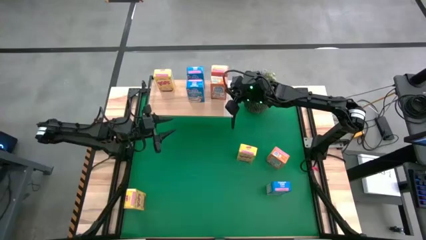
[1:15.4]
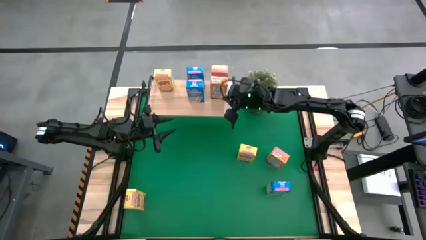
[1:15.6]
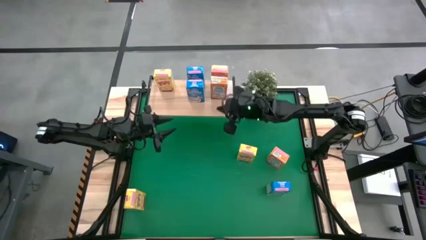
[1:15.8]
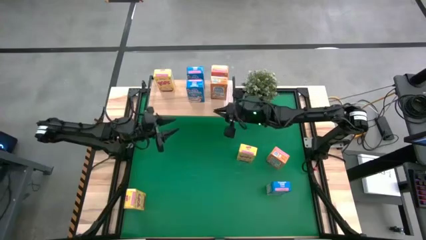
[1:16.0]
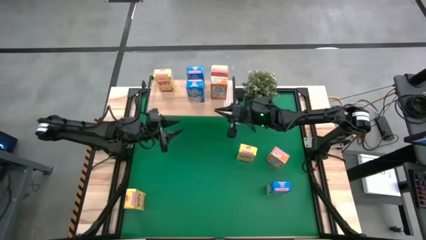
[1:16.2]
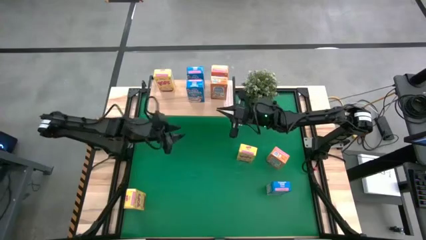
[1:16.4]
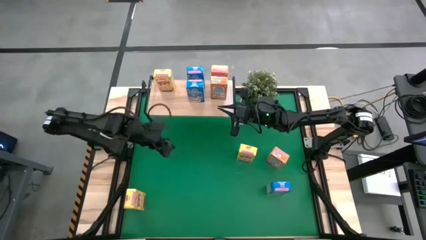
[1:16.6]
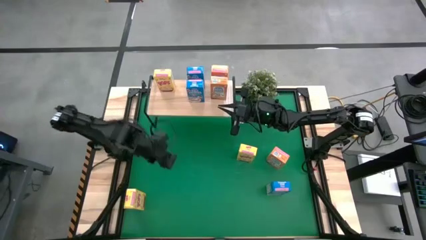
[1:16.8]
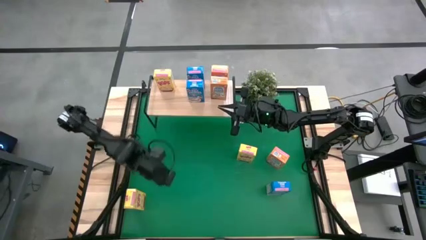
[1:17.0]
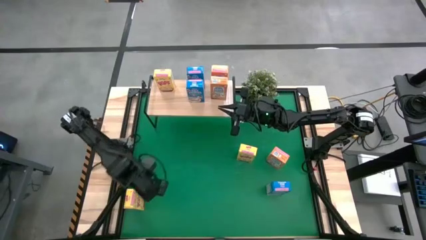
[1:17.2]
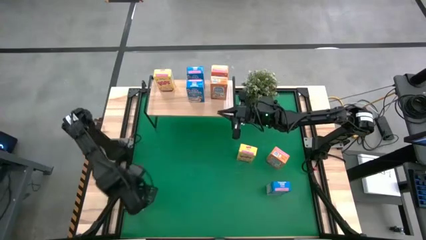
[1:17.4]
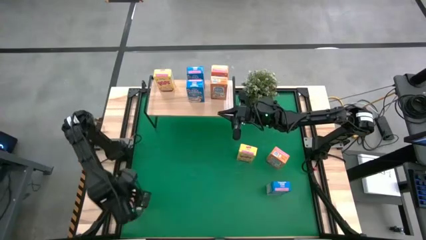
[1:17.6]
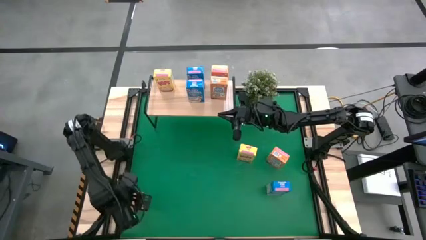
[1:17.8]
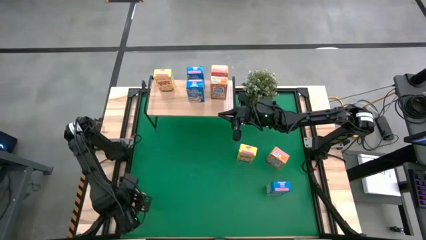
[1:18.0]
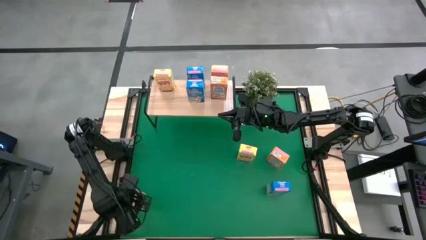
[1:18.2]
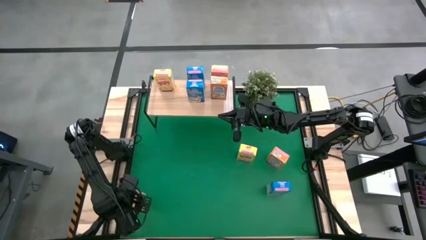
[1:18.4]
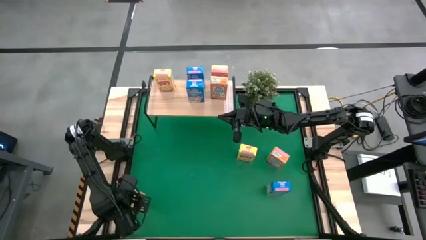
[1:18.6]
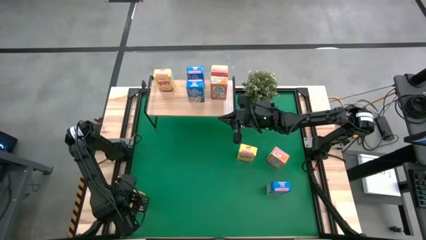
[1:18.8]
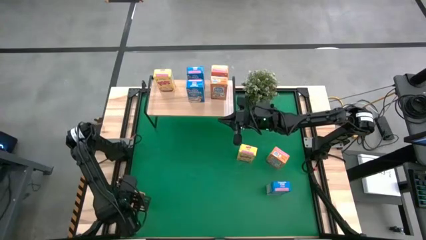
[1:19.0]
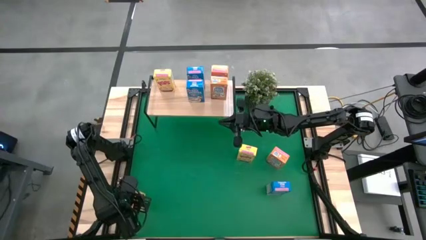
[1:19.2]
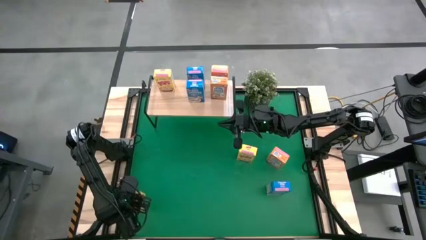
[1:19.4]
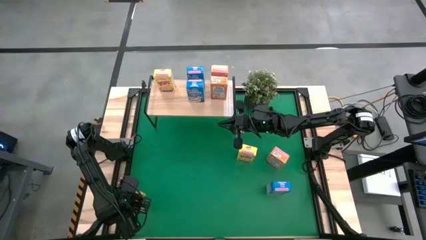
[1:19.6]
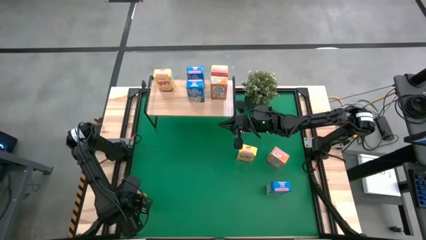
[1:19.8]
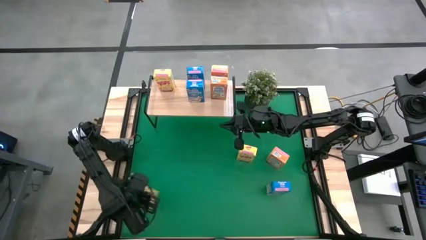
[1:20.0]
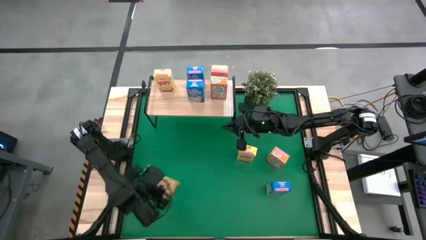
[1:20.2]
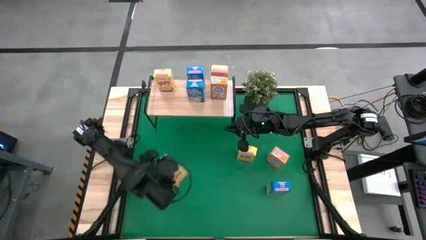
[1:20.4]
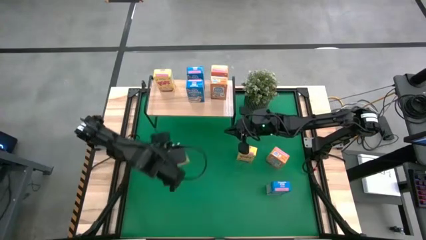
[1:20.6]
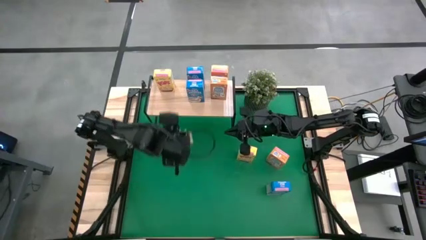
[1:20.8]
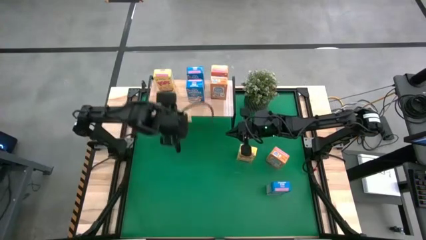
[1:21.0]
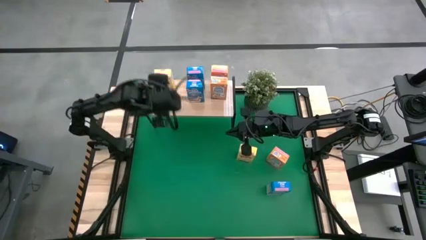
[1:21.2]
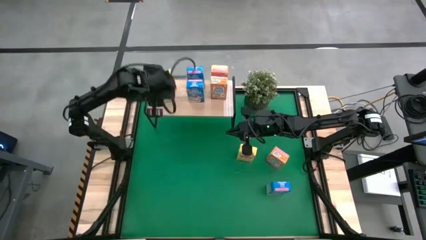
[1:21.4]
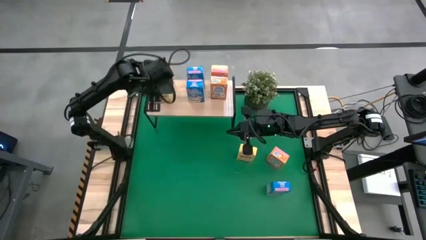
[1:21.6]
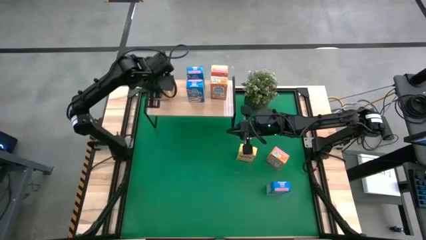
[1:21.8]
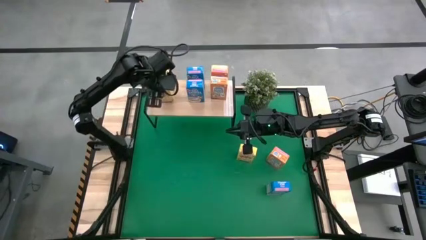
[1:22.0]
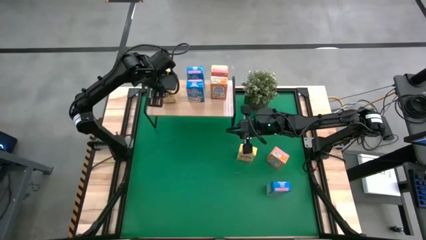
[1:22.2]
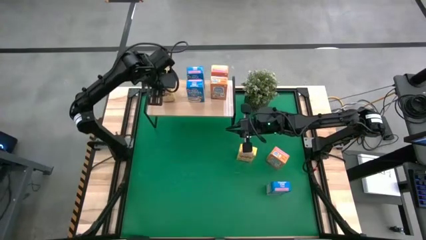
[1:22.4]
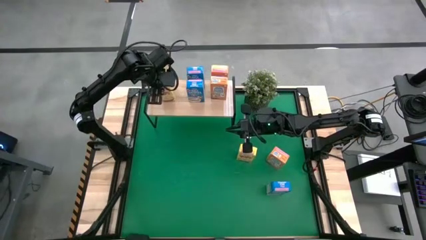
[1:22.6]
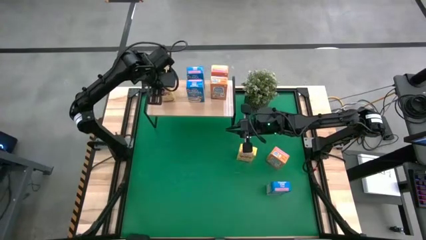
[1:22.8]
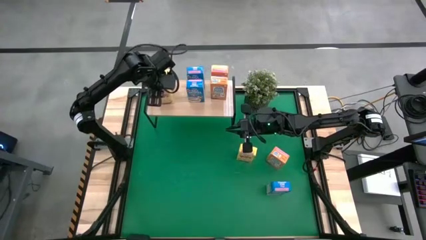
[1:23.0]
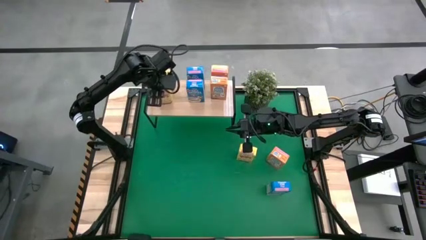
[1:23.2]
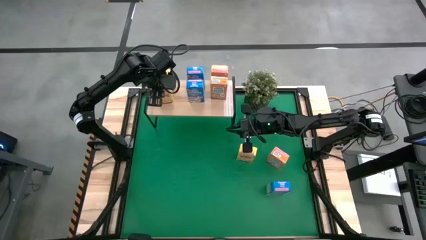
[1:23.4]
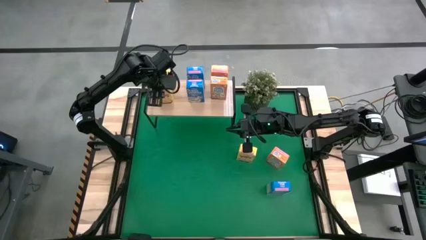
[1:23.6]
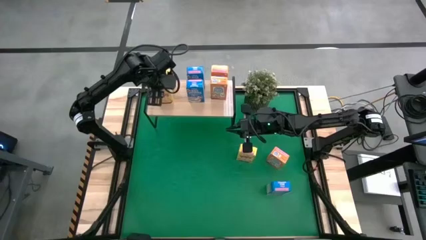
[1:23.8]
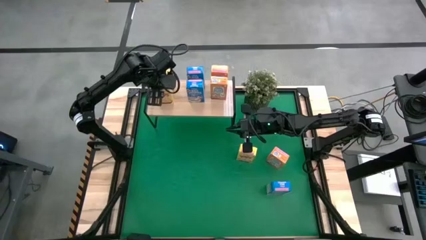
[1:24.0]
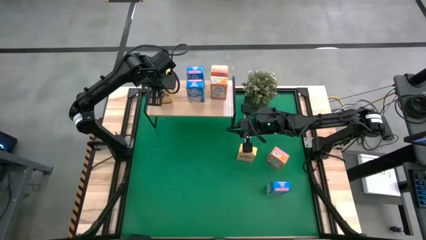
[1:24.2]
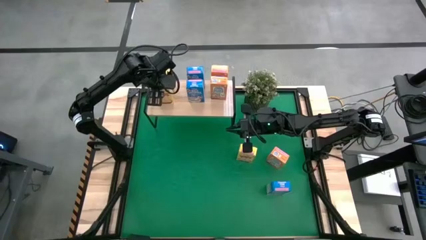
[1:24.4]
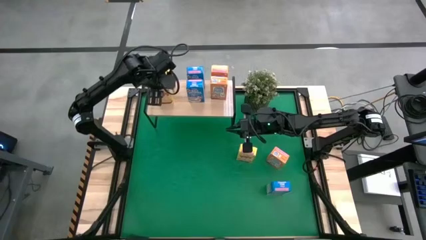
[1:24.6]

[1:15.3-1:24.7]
Task: Stack cereal on shelf
Put the bottom yellow cereal box on the shelf

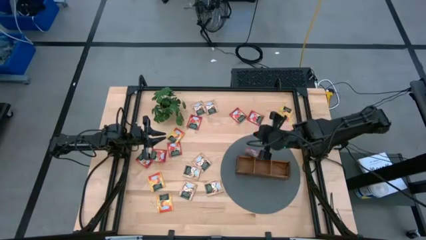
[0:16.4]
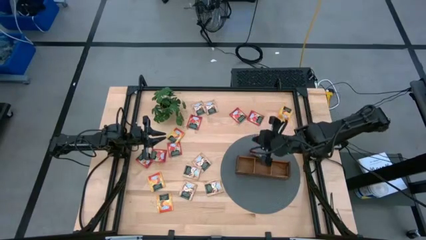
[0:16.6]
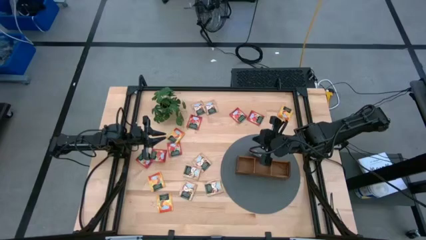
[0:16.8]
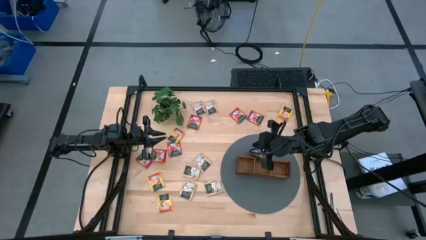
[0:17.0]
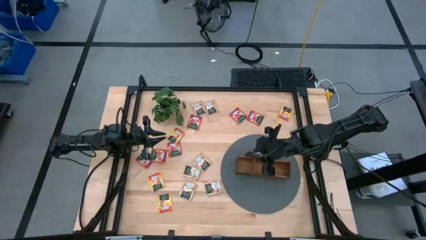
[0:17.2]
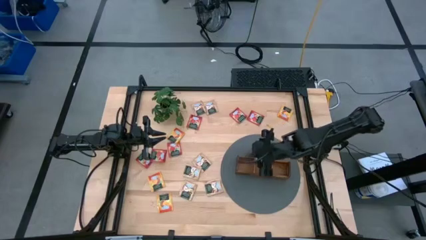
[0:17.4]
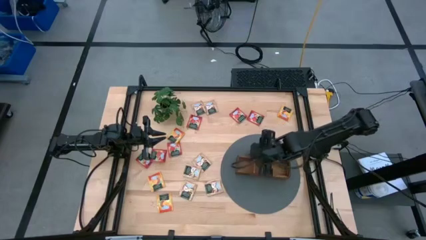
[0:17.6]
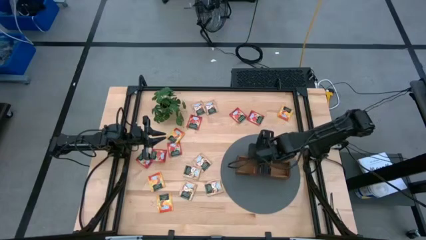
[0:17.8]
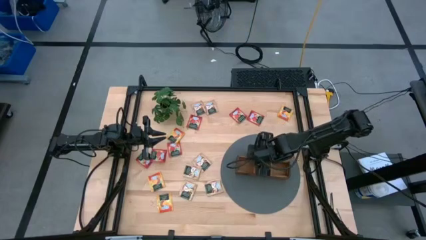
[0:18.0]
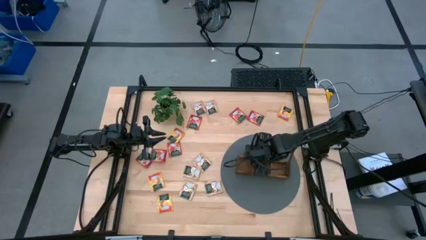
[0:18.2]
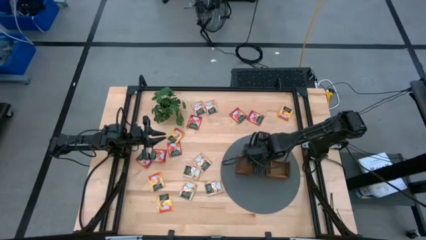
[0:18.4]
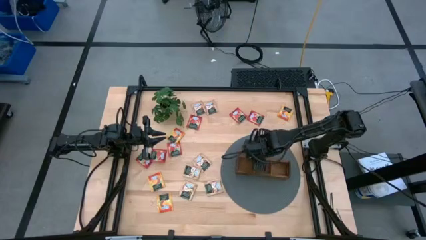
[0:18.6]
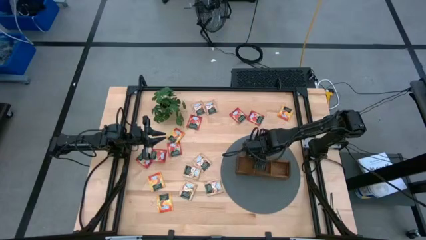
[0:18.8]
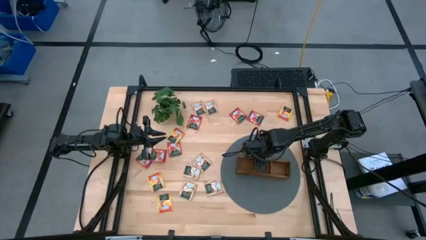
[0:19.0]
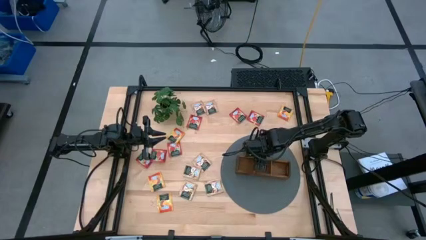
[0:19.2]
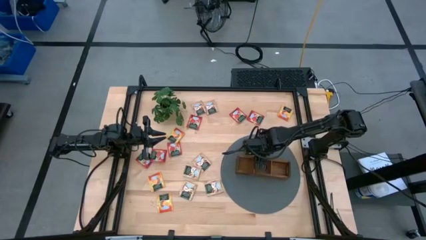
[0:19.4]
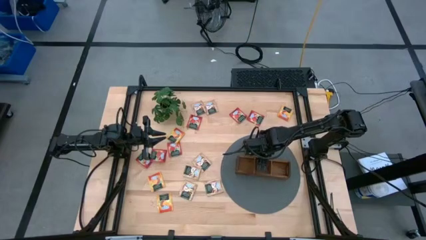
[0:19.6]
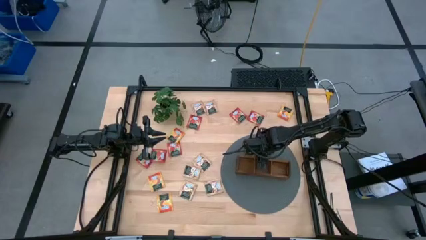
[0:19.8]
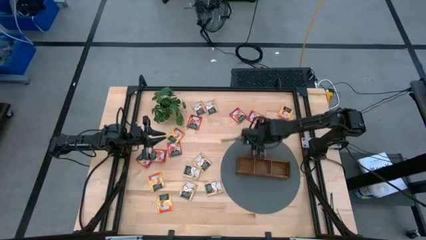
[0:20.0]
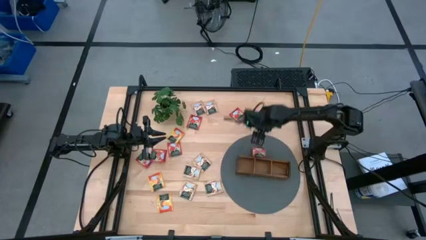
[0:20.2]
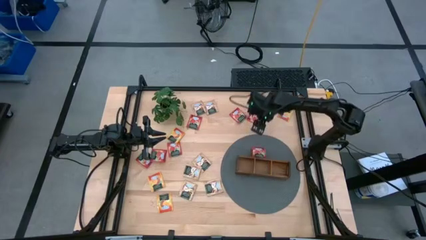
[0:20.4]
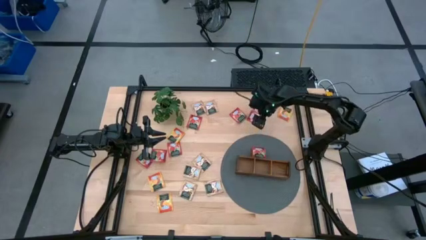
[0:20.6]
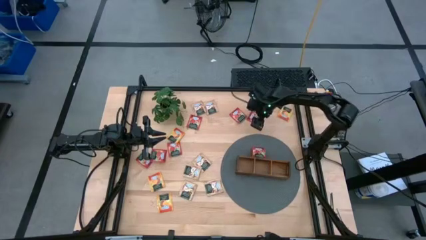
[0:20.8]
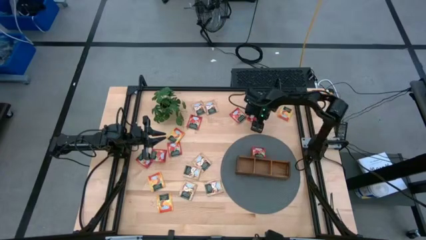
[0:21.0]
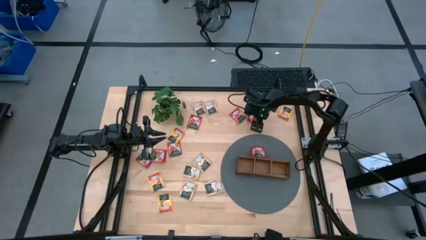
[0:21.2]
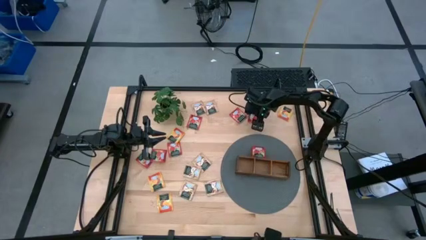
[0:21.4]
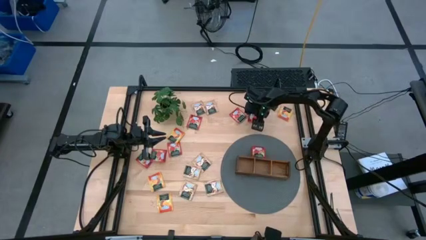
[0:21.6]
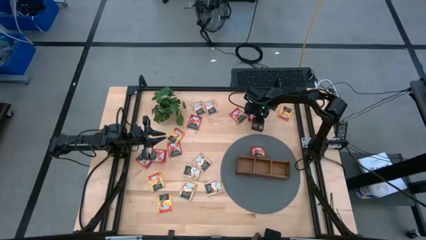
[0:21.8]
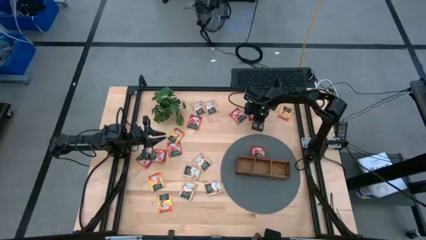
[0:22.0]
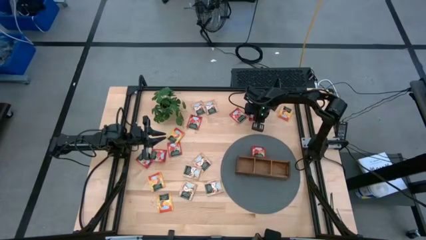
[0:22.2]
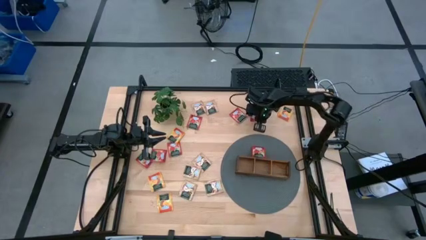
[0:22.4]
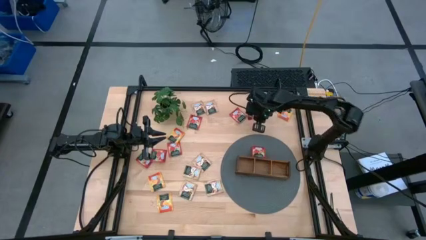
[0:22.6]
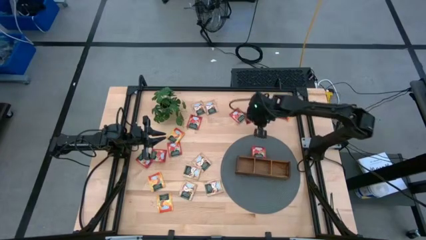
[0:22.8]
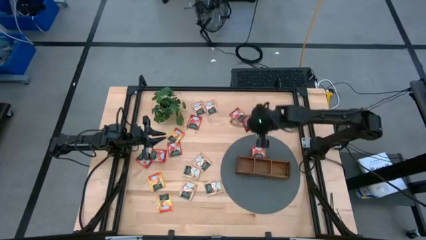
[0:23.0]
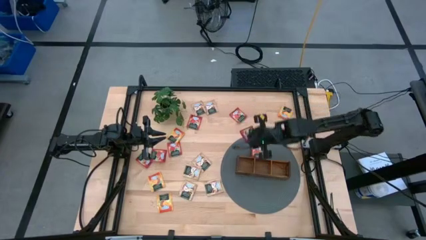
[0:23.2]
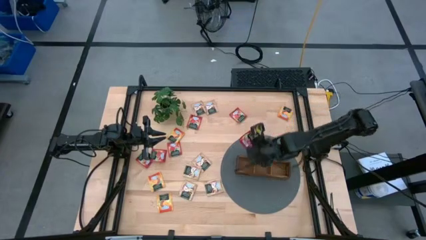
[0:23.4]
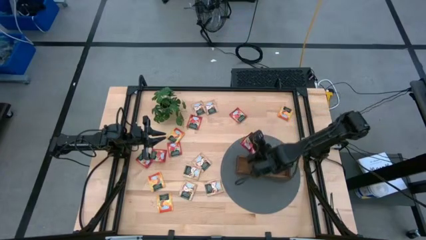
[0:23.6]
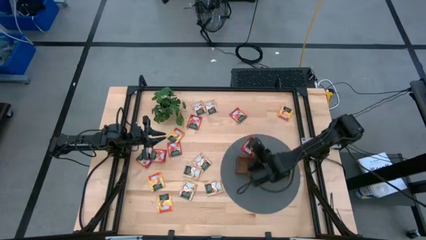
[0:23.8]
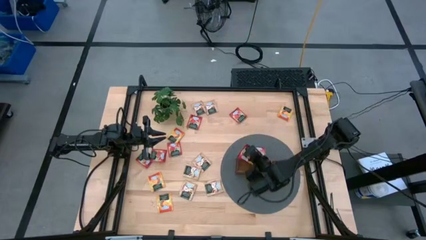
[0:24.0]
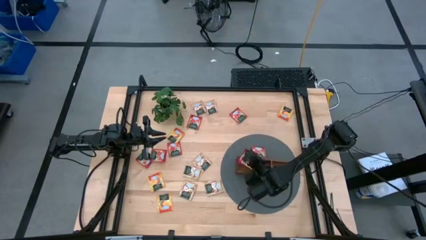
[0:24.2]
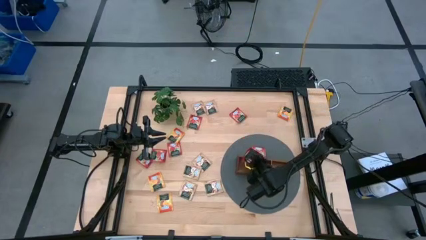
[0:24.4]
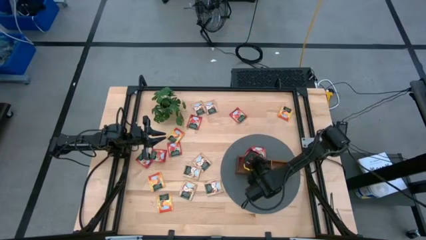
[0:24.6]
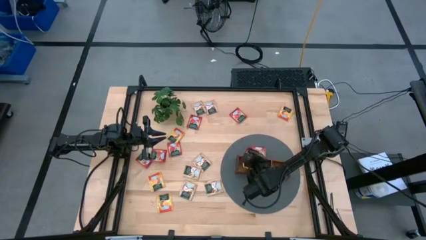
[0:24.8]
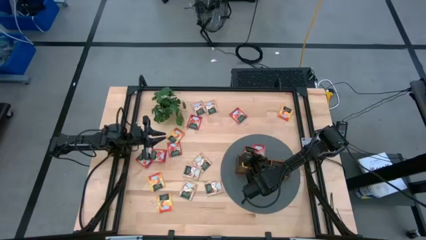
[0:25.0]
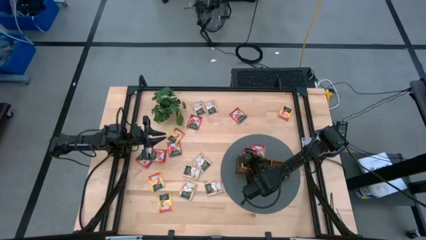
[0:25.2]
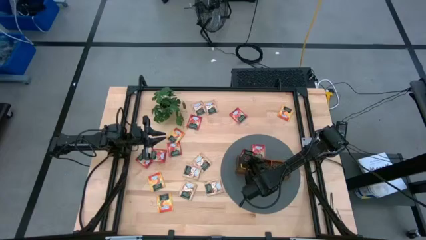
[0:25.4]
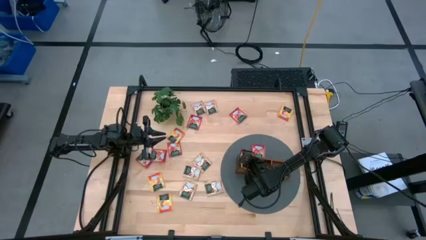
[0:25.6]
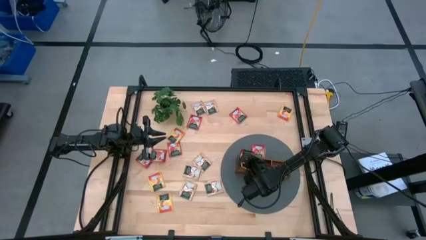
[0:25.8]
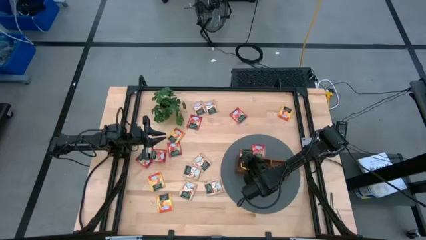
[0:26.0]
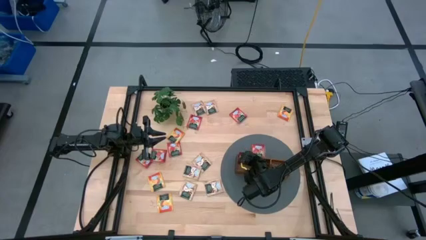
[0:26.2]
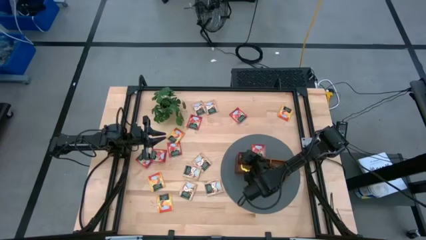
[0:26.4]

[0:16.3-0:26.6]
Task: Pick & Place Tea
Put the red tea bag into the left section of the wooden organizer
